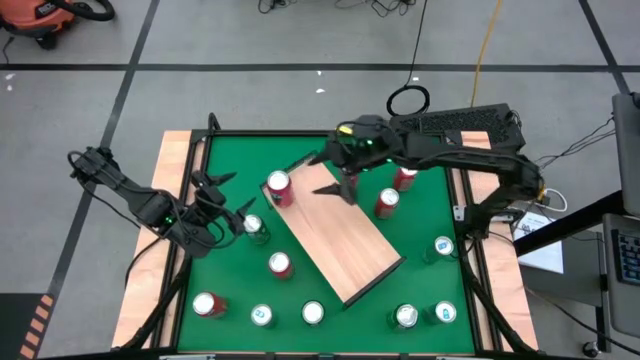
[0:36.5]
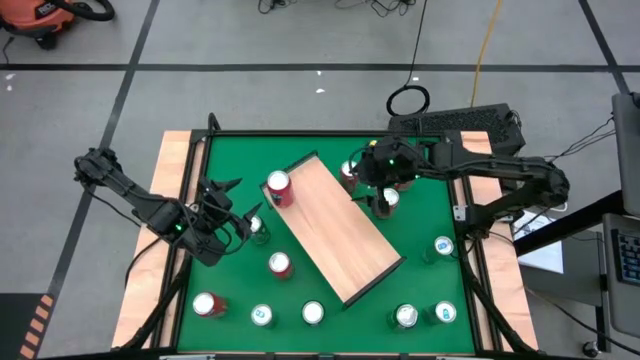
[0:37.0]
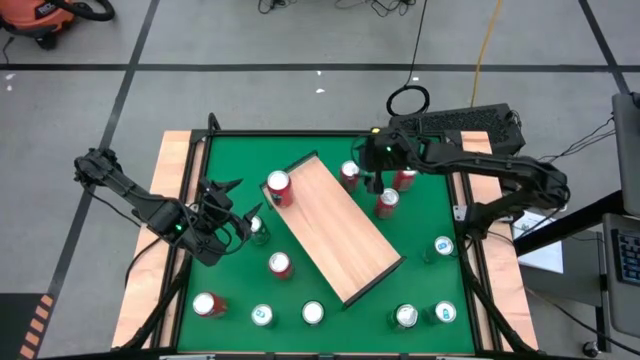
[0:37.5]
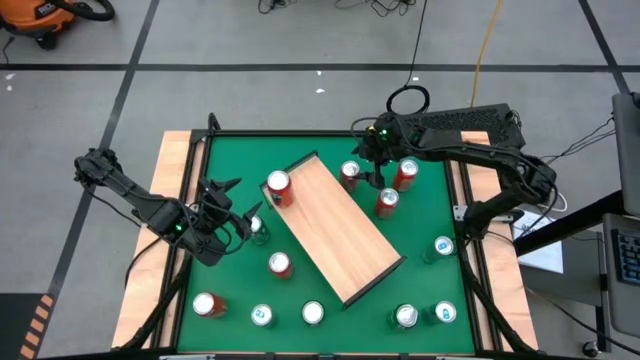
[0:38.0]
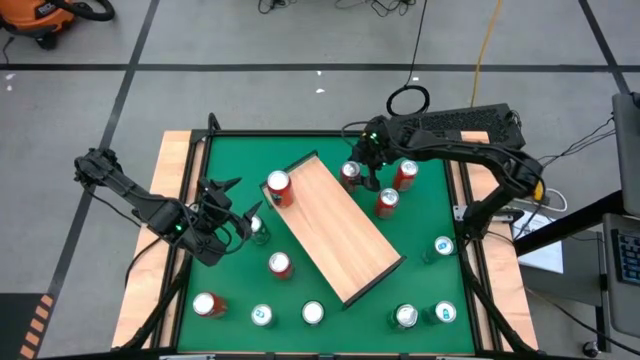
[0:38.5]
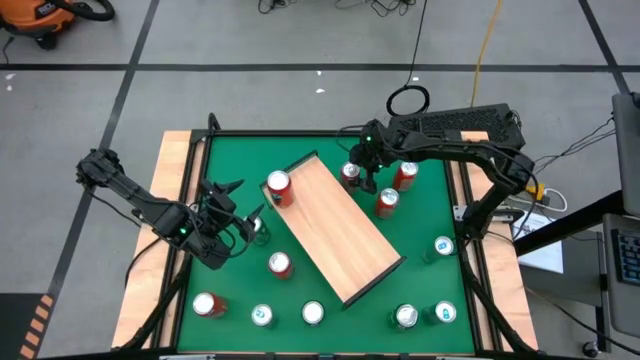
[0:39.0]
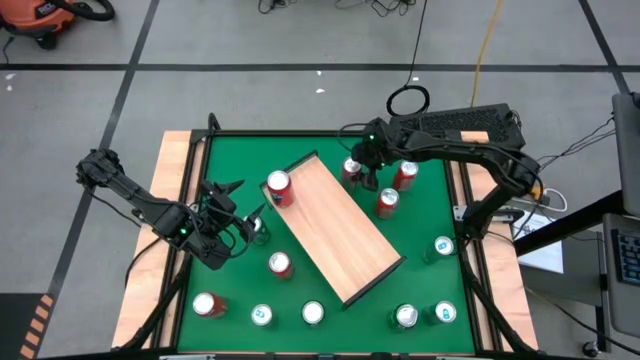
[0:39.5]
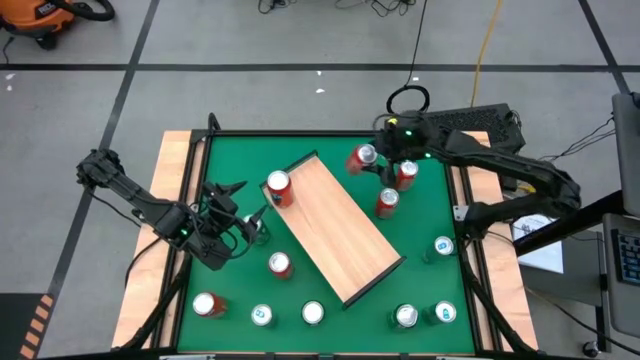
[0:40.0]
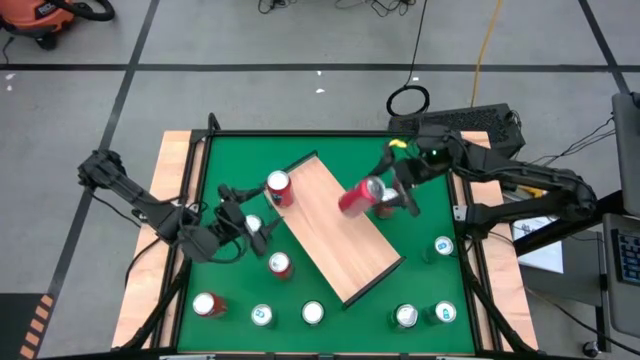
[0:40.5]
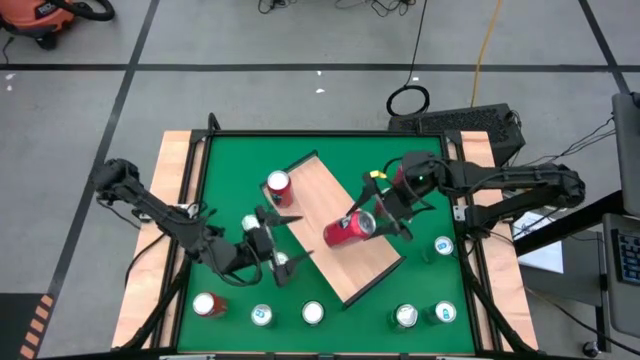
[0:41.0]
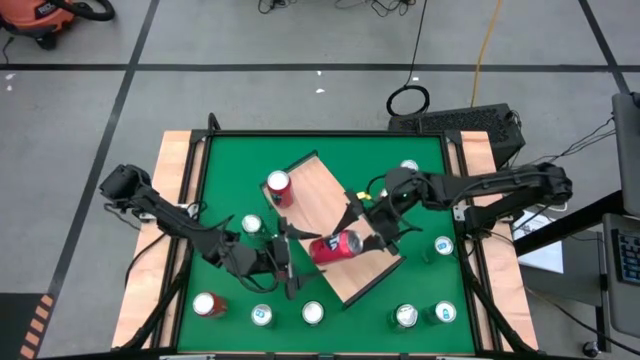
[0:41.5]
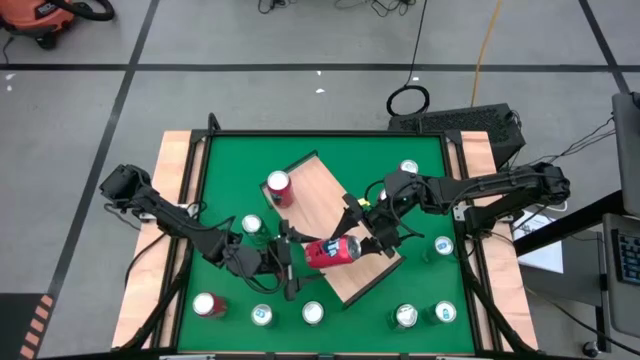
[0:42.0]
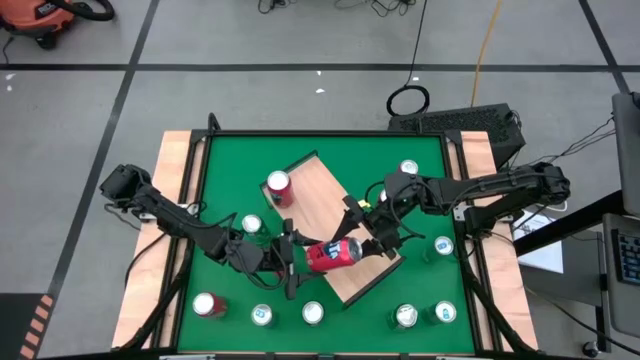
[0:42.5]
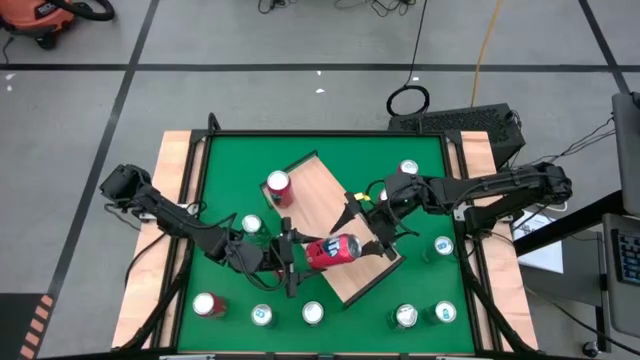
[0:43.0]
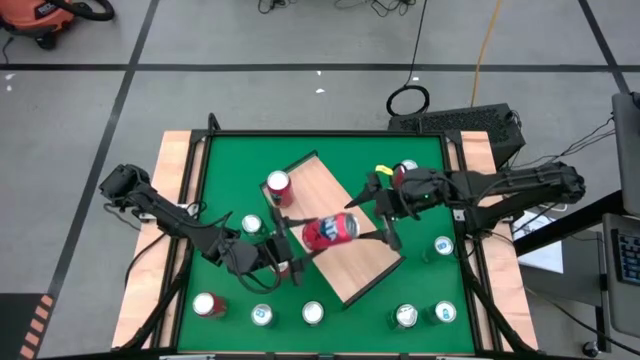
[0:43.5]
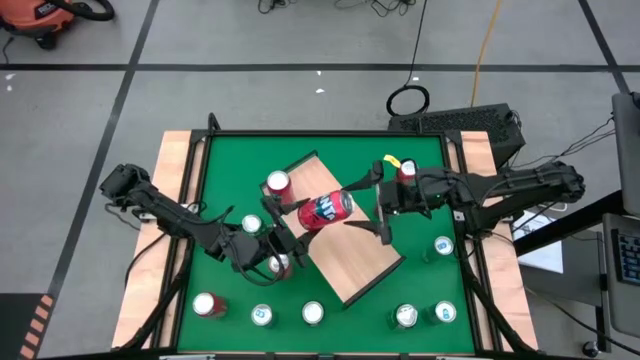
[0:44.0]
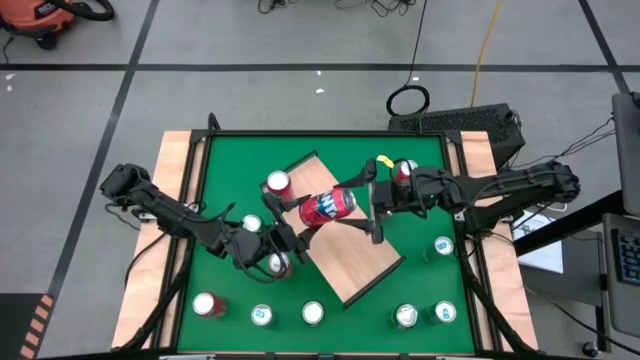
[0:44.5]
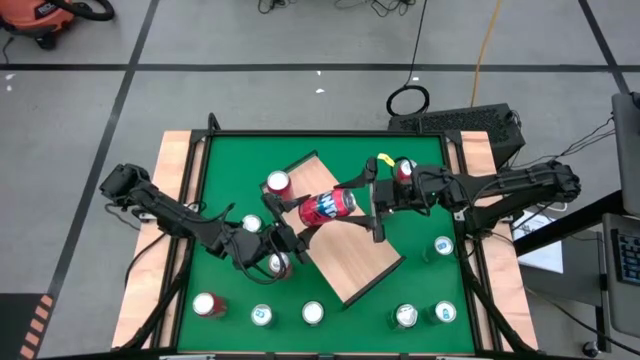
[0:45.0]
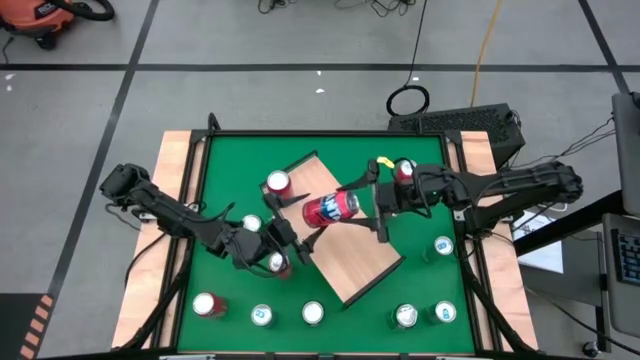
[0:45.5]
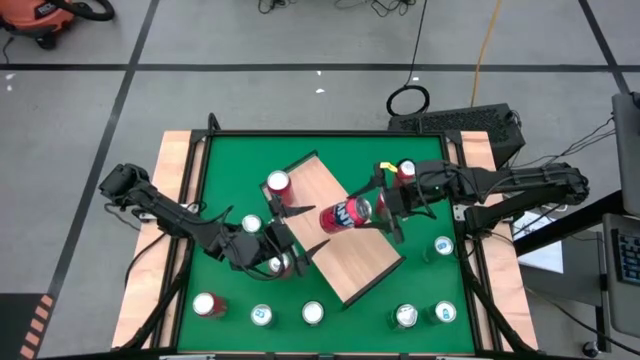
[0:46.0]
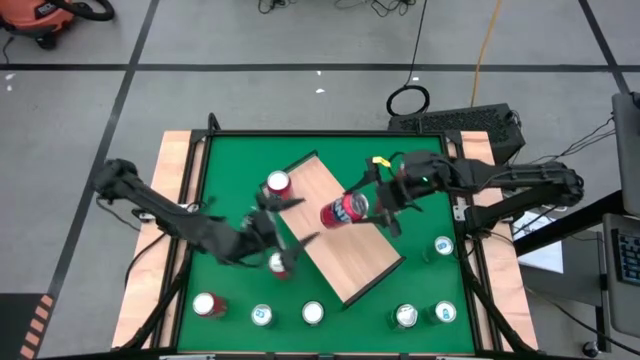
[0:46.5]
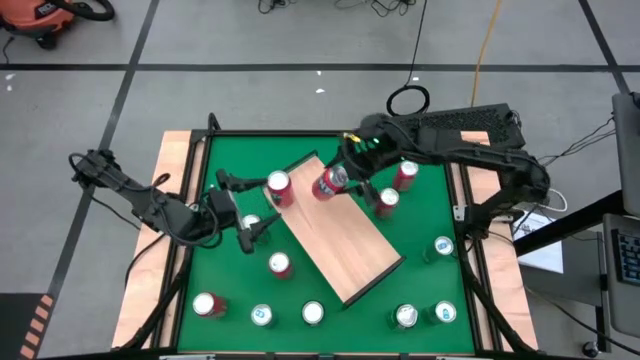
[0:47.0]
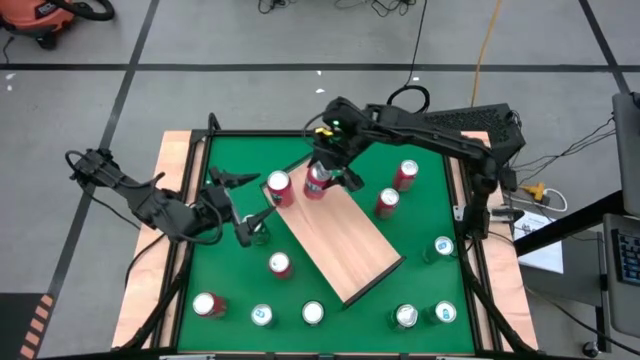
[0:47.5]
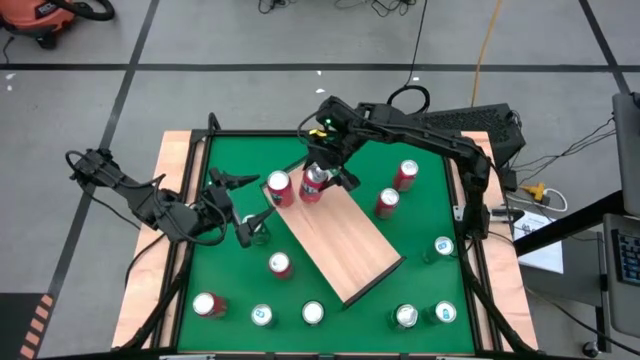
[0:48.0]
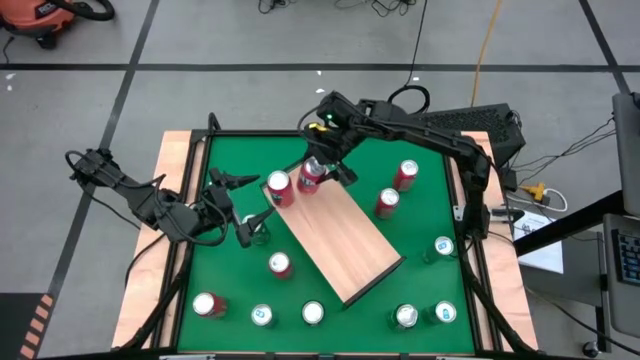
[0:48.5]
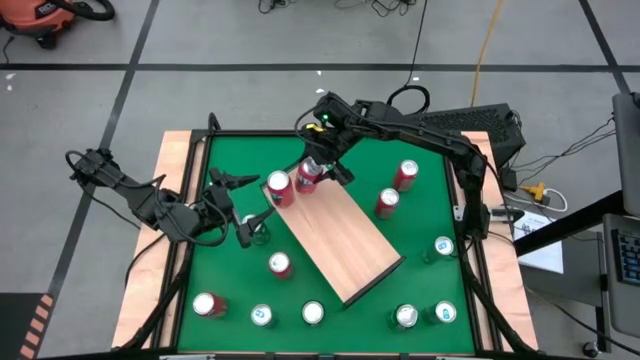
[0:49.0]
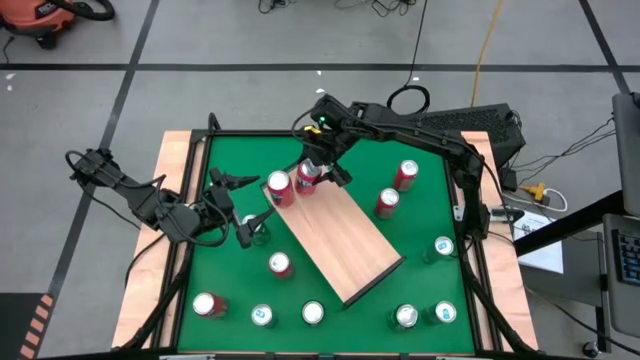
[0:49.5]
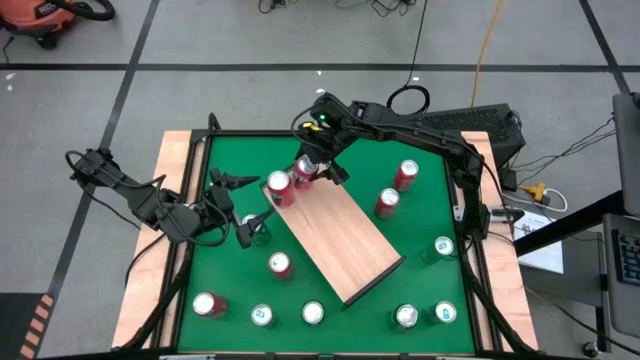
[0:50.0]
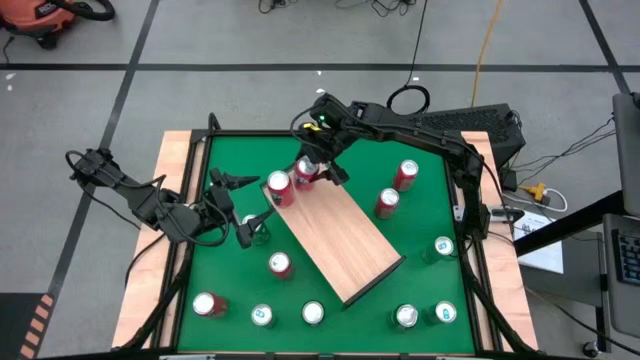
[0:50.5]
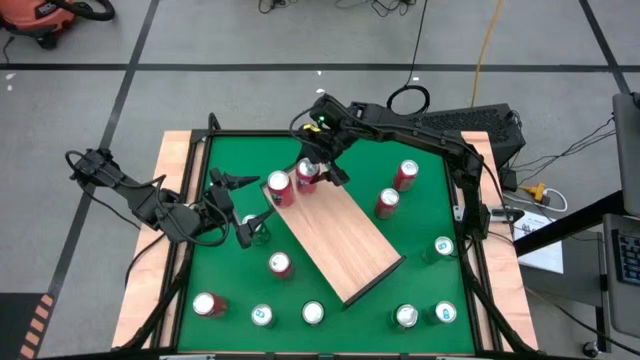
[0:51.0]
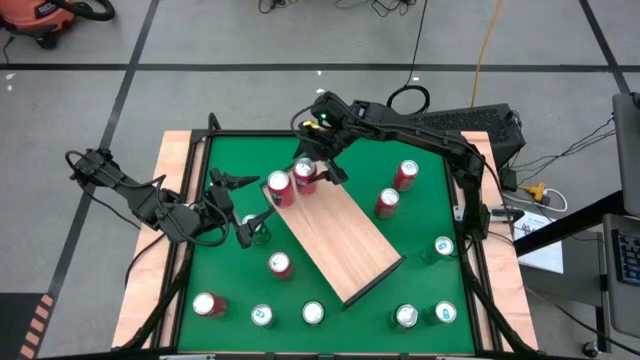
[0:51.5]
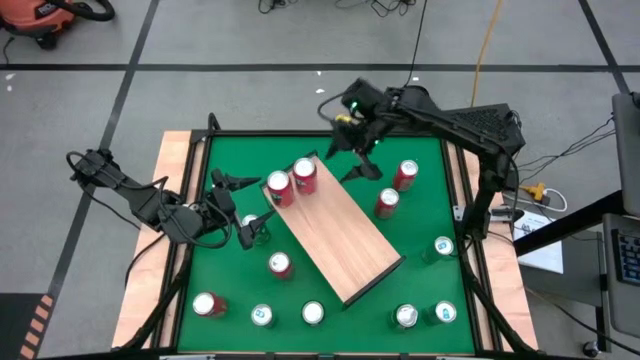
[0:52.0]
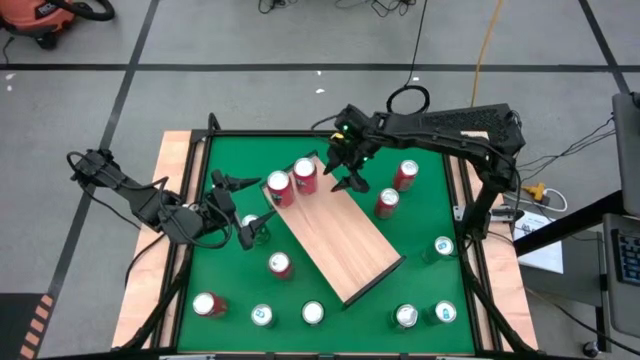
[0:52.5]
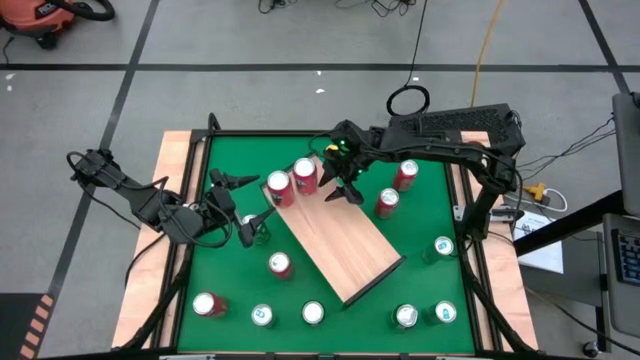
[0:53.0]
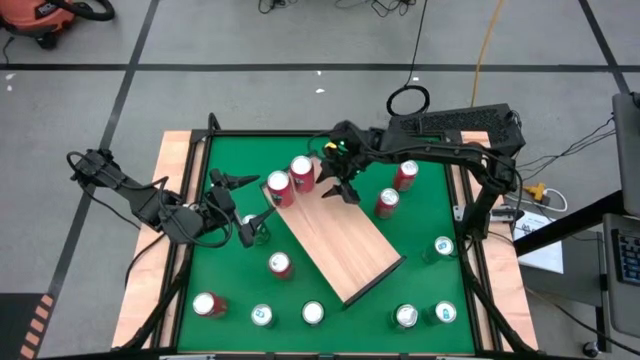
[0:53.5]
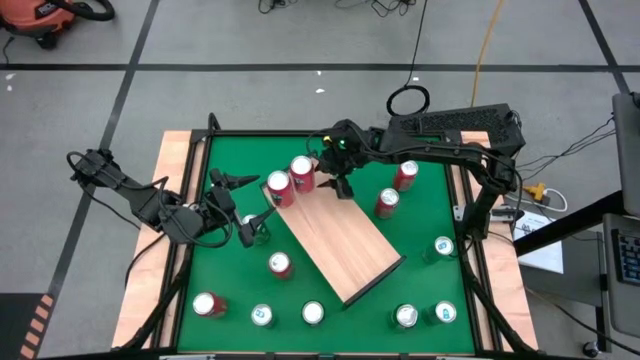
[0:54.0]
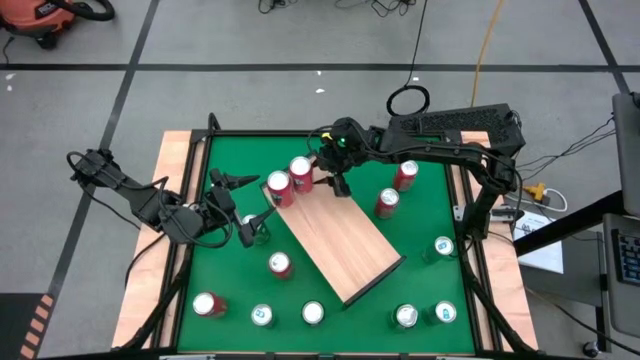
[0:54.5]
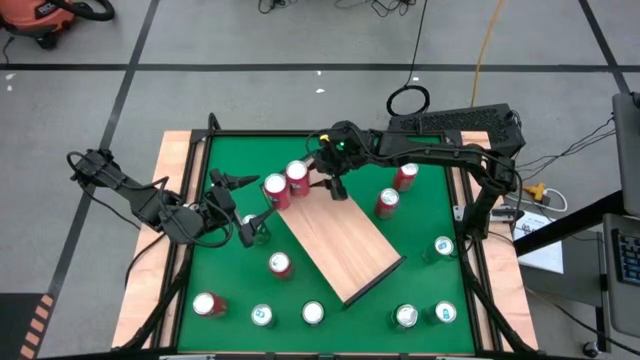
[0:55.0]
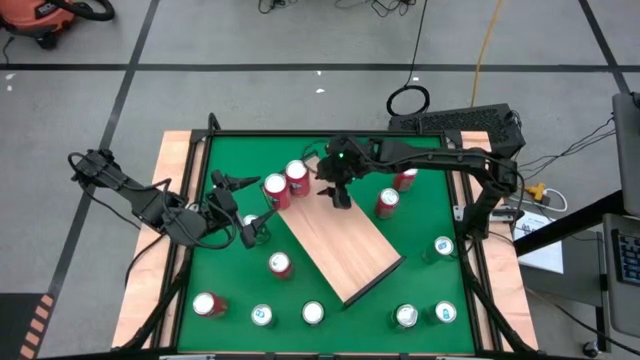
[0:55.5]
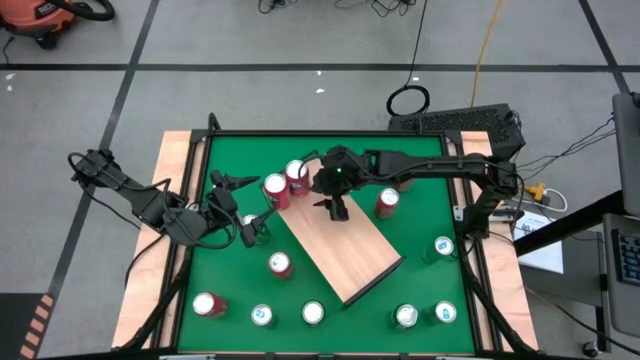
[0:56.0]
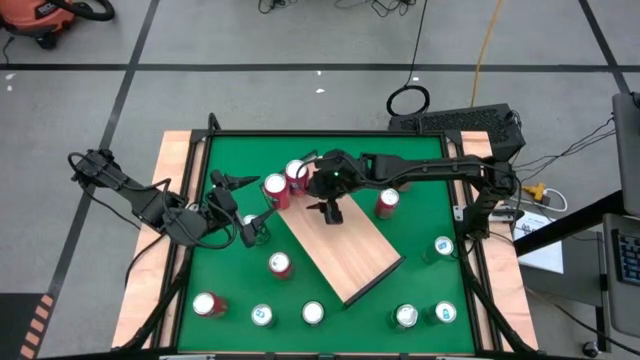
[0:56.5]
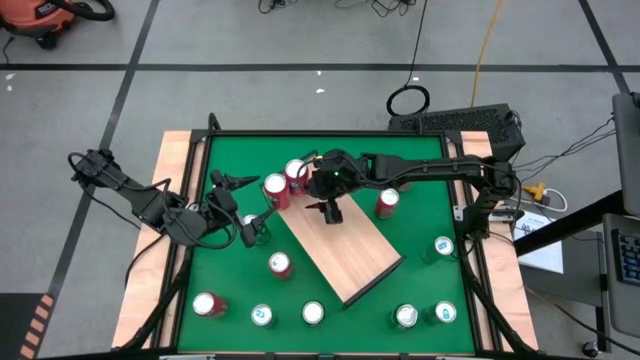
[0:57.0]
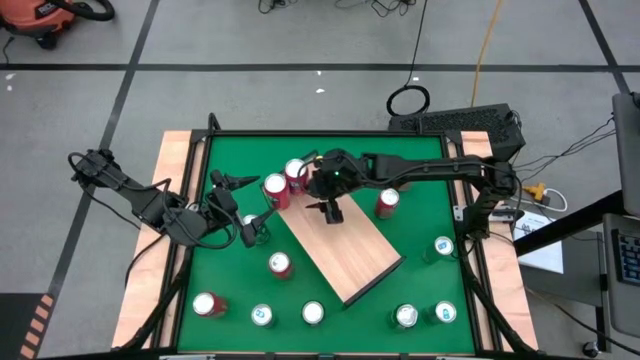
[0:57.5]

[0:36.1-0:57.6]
Task: Place canned beverage on shelf
Put the red soda can on the shelf aligned with the other red soda can
